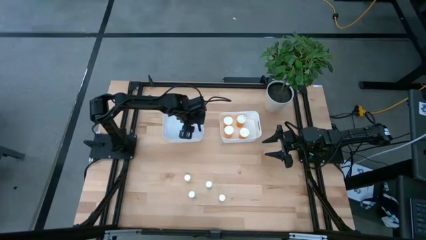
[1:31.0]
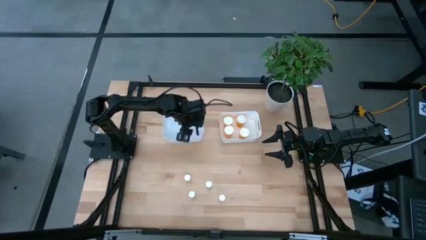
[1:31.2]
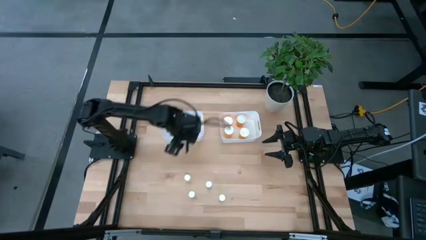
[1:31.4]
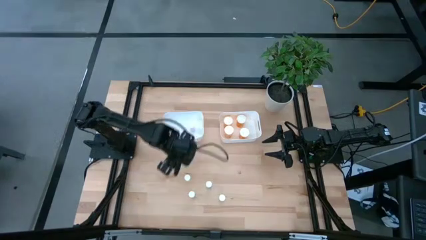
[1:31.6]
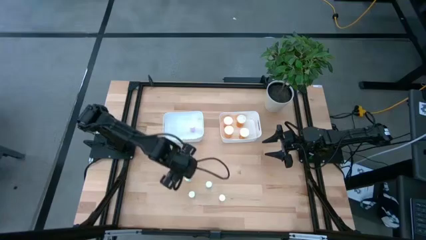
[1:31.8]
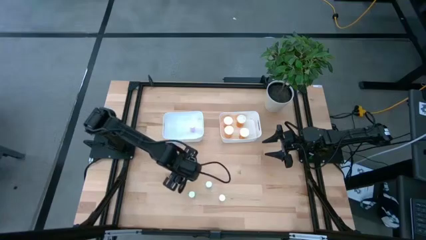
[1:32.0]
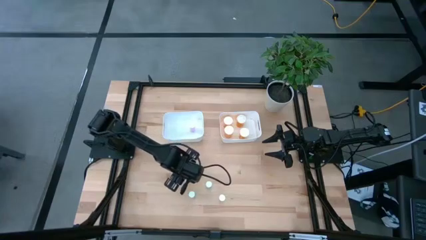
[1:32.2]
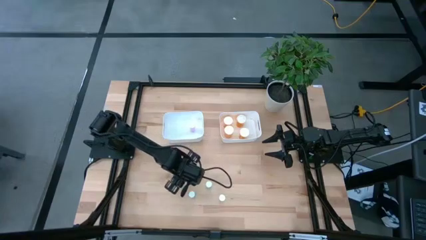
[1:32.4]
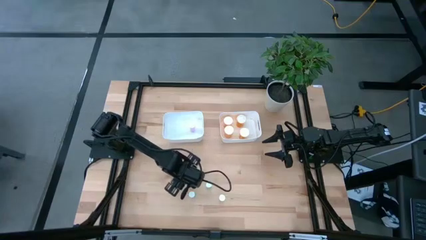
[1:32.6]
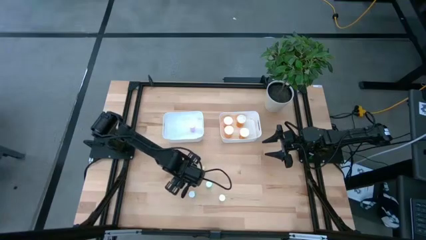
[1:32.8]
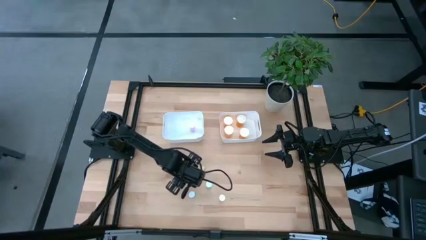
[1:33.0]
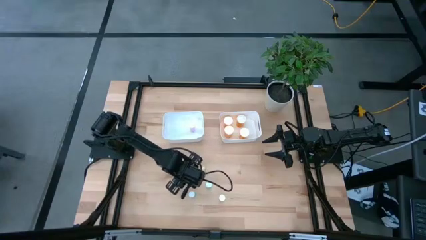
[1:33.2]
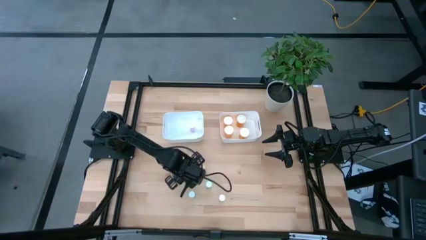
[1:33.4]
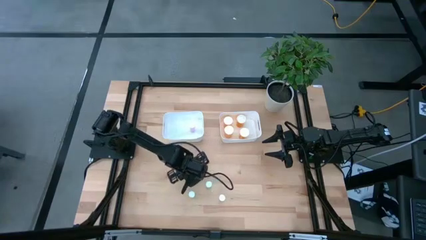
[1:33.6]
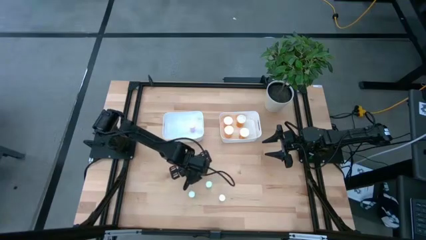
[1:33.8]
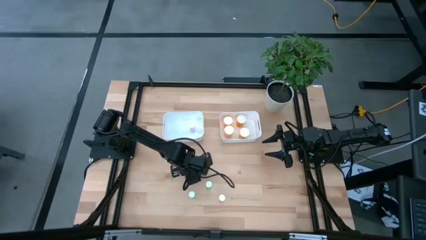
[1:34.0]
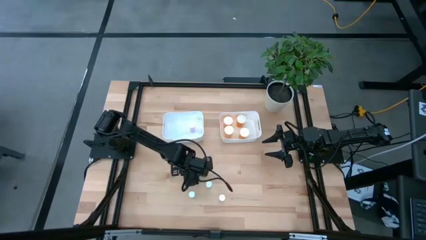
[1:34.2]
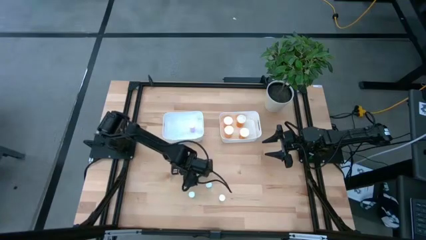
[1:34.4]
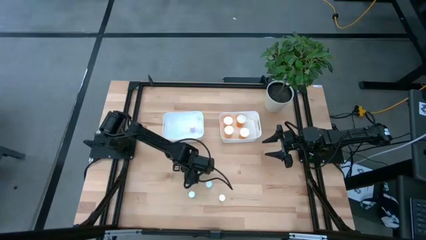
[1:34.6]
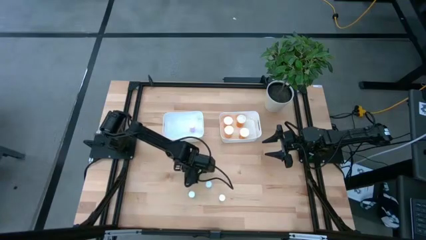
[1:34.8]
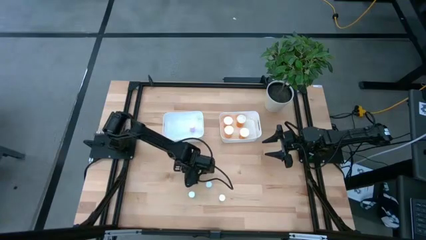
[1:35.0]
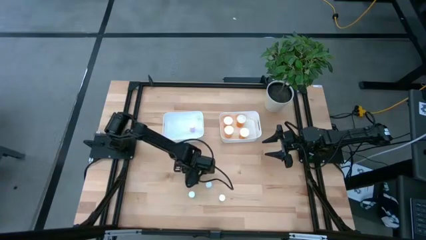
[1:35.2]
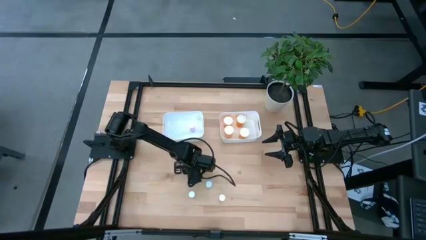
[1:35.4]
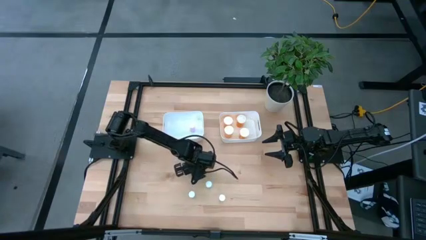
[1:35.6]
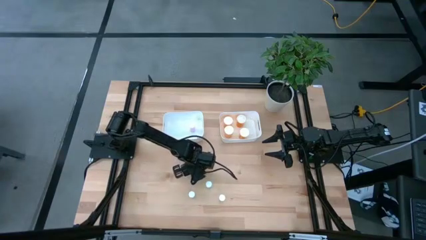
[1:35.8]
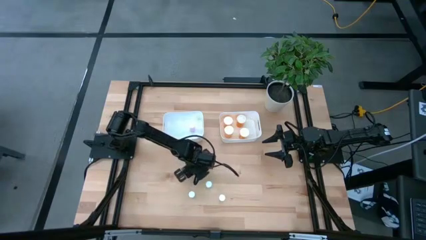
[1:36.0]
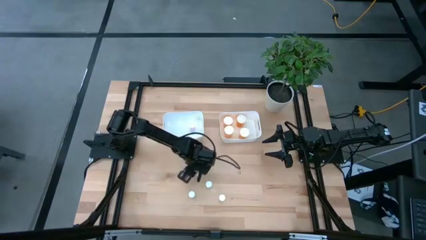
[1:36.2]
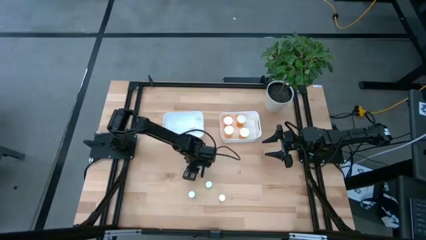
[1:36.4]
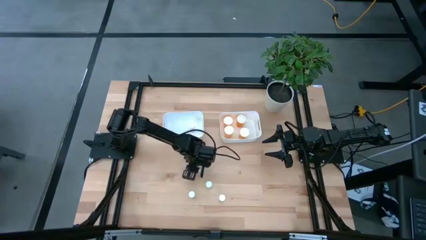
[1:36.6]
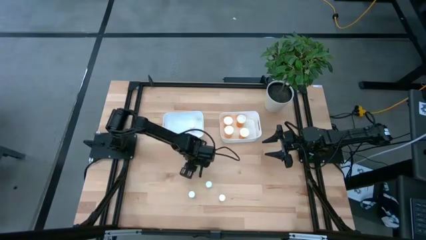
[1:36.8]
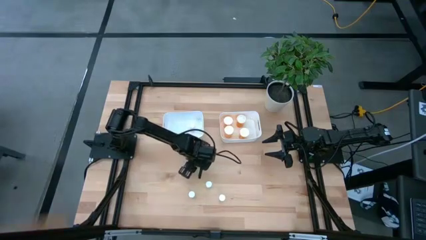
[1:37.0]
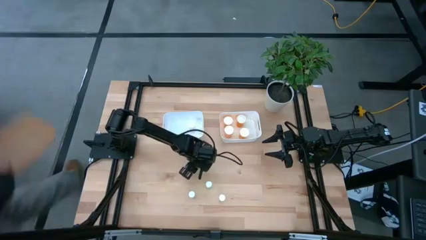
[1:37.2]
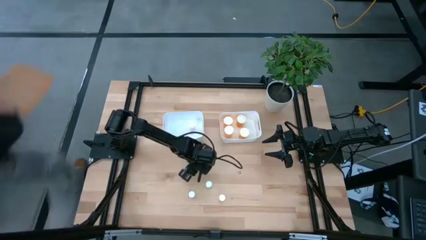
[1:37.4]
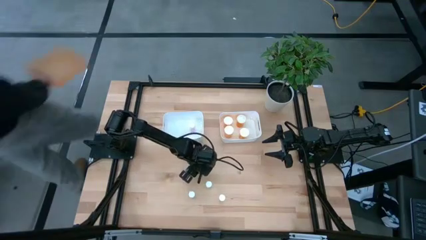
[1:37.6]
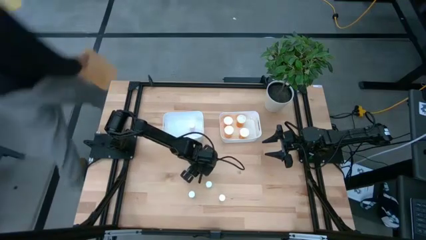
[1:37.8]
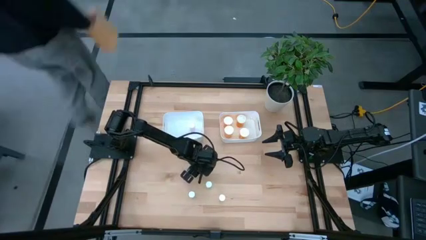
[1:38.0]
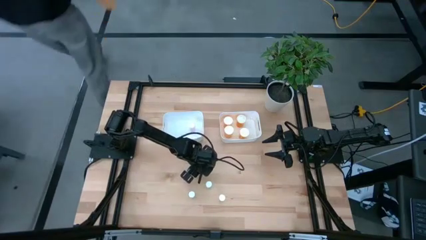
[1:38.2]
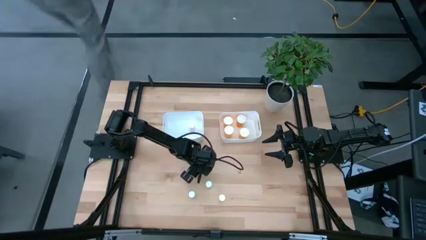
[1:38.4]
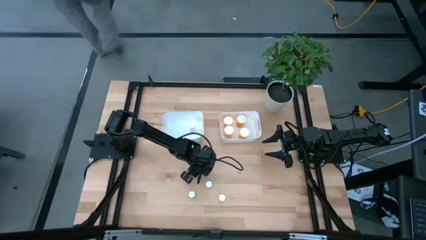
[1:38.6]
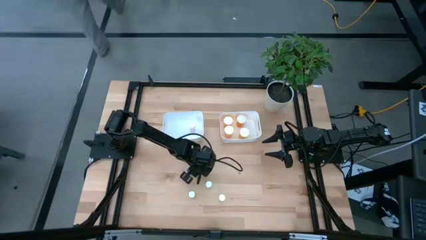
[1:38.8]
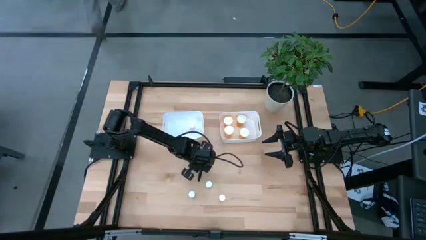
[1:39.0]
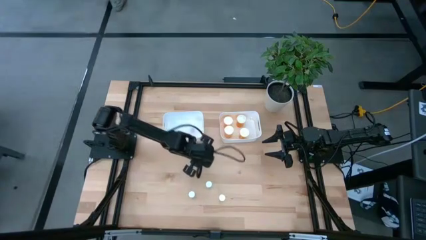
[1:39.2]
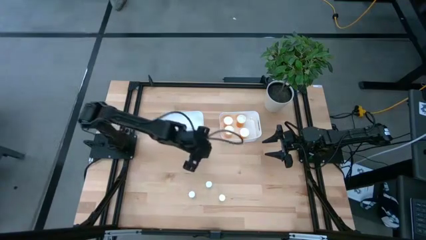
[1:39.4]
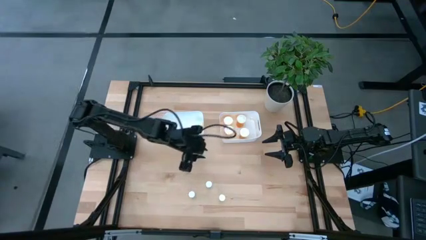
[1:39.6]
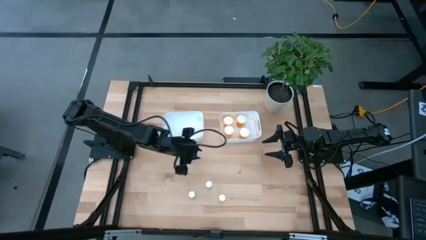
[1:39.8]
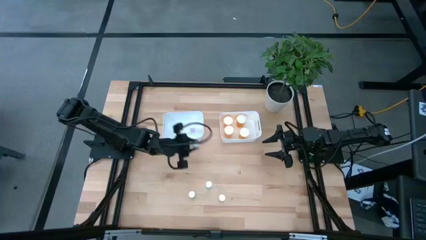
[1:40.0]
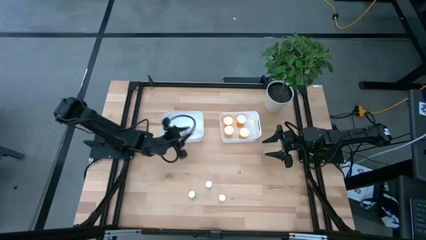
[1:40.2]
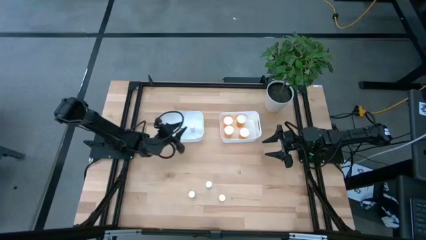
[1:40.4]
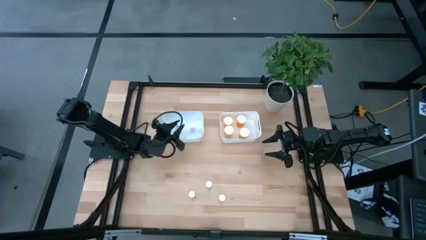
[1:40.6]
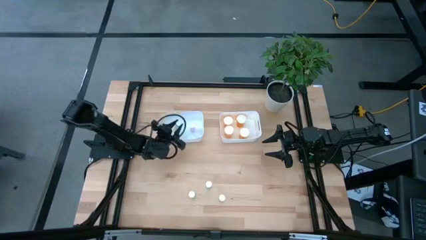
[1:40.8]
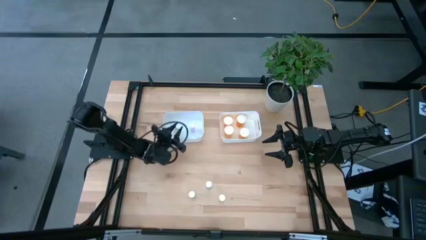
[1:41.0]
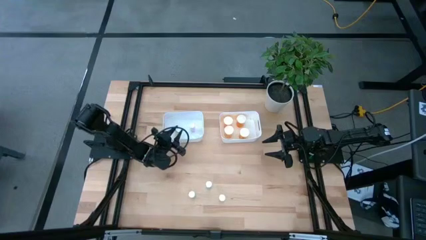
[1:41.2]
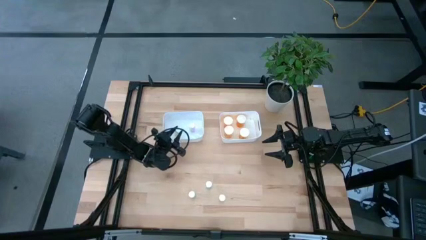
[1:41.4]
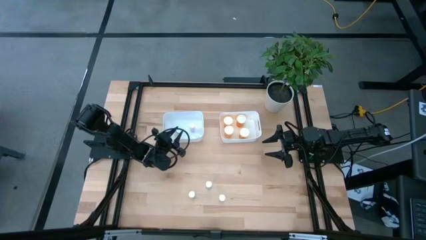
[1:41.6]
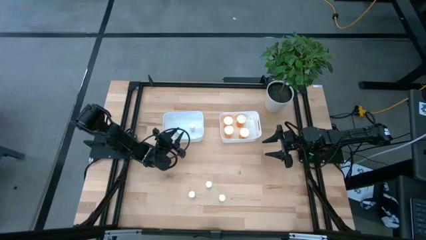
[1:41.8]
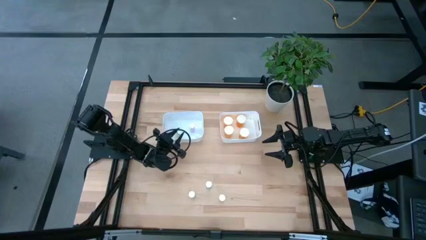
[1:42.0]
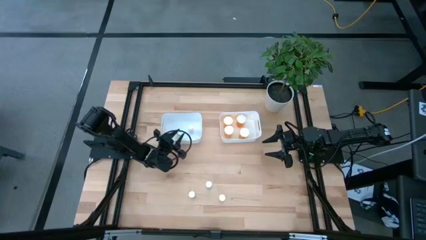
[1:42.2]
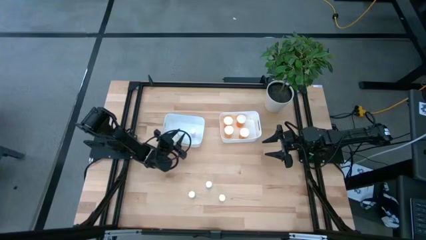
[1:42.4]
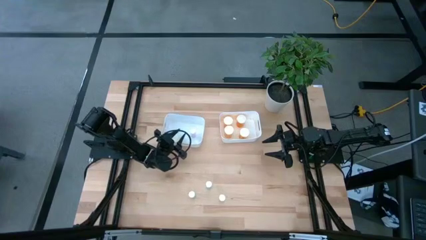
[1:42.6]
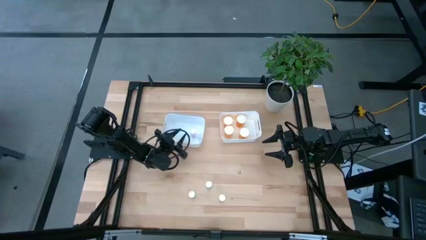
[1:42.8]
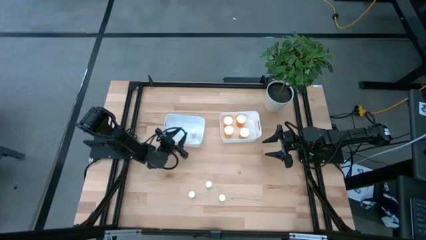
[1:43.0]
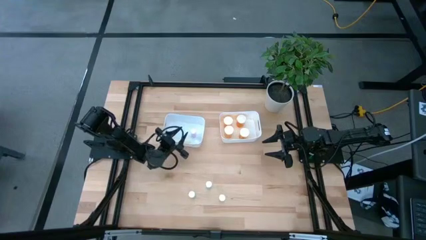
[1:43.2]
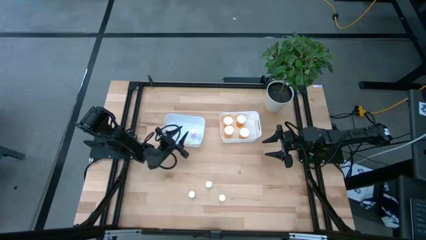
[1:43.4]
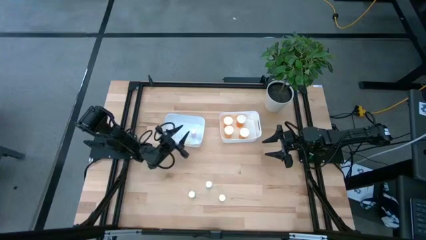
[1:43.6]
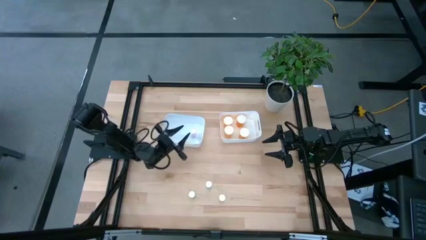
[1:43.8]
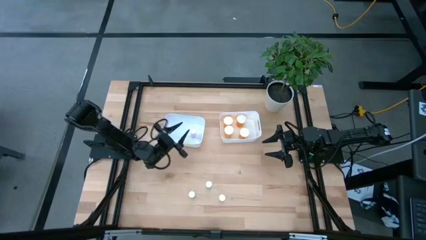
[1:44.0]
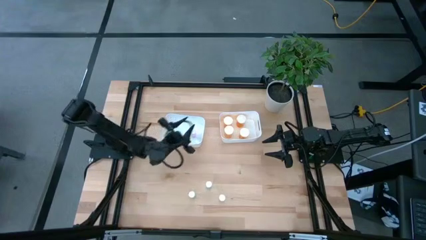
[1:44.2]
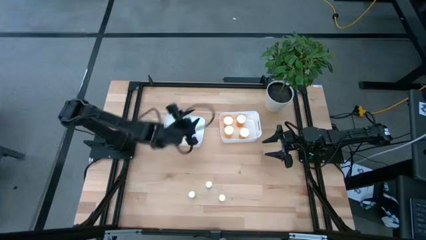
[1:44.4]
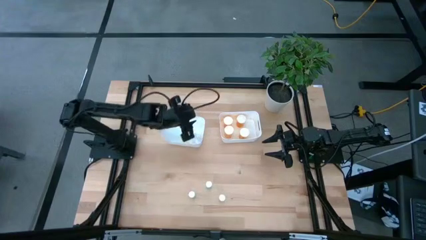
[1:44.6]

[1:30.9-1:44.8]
Task: Pick and place medicine bottles into bin by pill shape (circle, oval)
Put the top yellow pill bottle into the left white bin

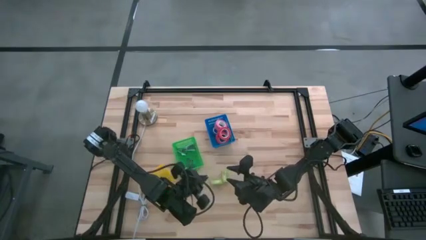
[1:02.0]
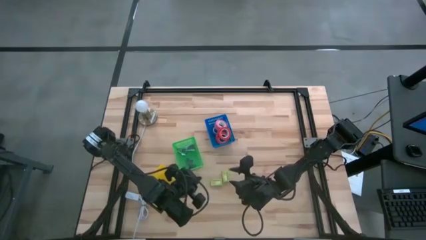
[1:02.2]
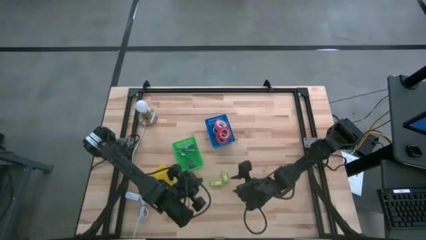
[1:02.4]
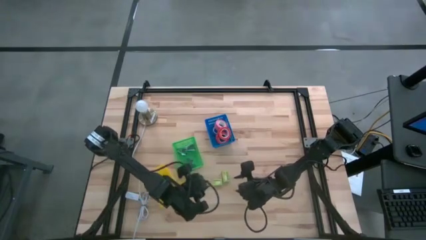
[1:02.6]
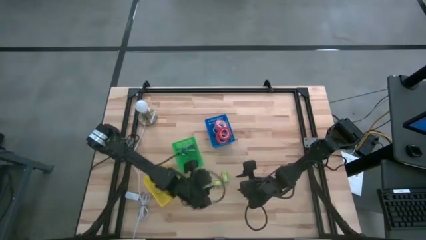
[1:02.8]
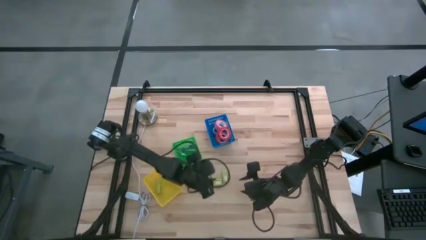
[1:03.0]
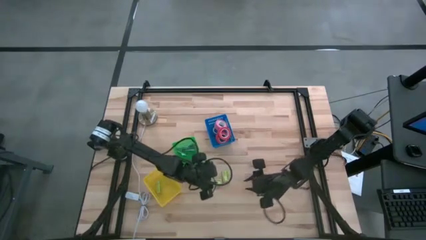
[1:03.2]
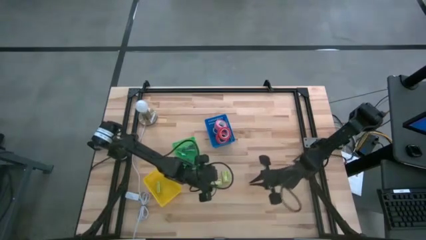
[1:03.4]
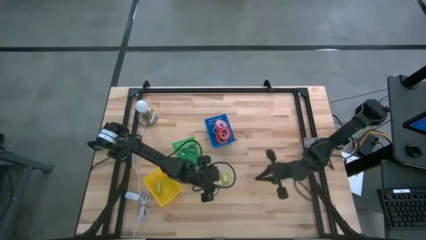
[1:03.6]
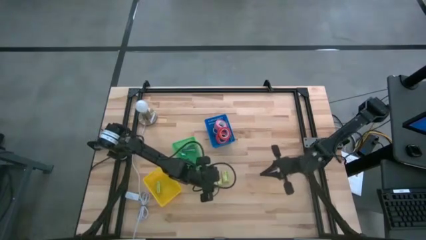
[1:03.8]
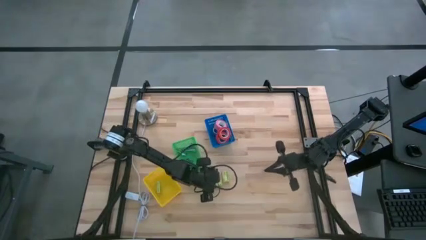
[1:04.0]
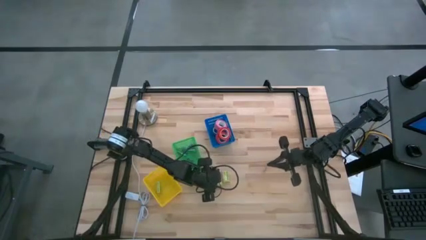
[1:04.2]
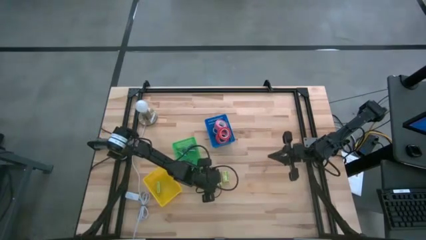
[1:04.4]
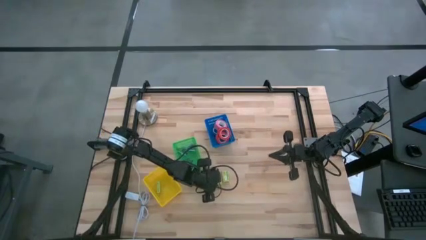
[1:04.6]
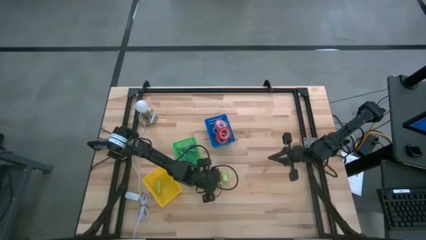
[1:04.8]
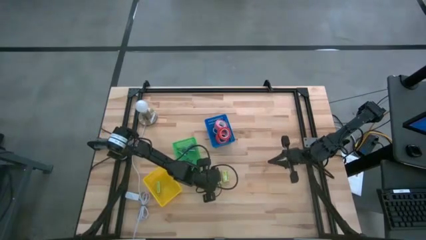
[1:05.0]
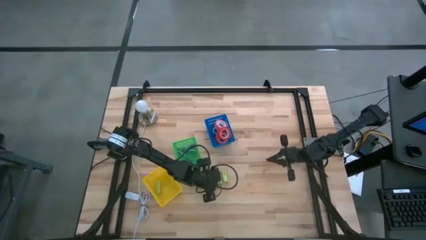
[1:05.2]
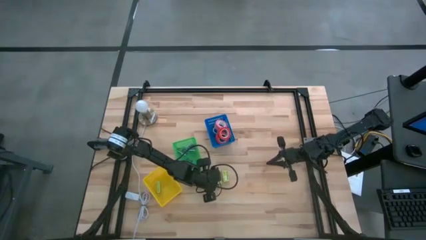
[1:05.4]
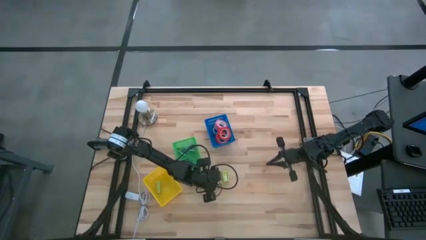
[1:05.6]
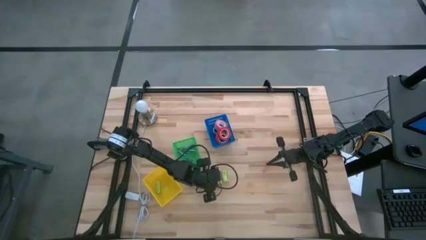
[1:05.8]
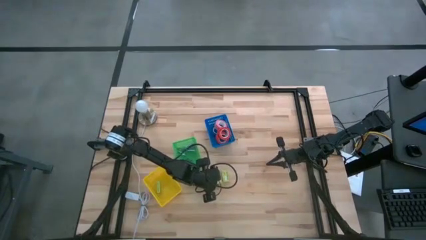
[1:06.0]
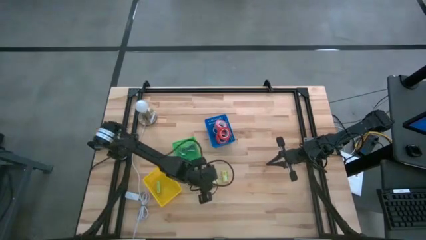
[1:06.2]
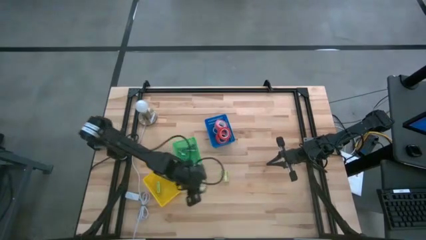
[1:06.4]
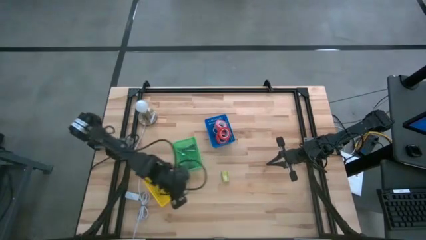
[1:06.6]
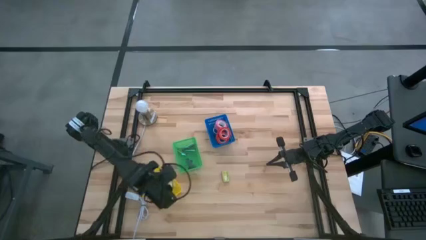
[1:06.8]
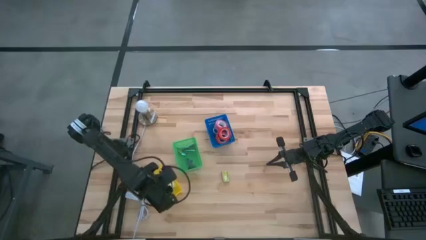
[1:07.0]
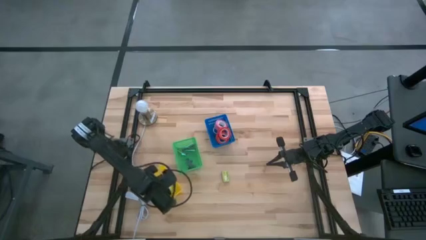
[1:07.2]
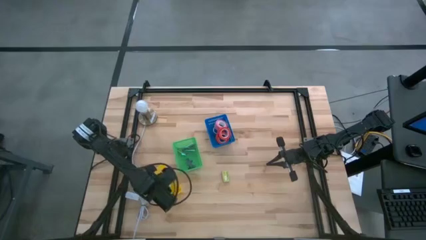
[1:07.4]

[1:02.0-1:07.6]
Task: Pick and place Stapler, Stapler remover, tape
Put the bottom green staple box into the yellow basket
